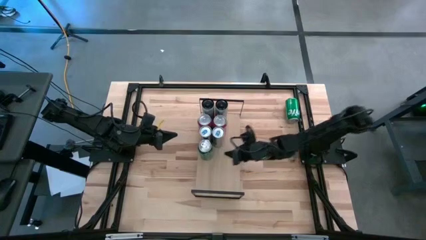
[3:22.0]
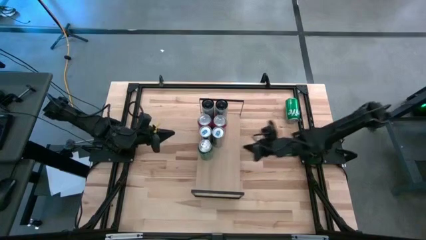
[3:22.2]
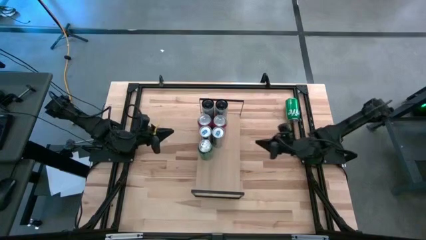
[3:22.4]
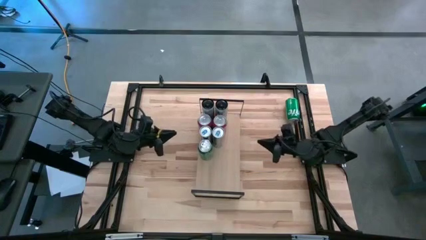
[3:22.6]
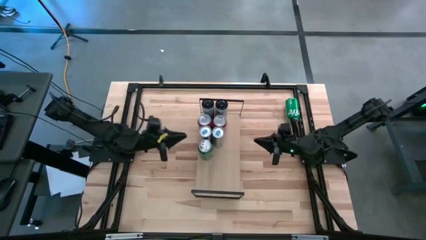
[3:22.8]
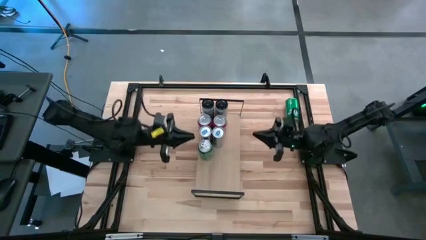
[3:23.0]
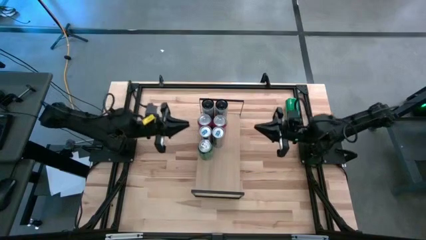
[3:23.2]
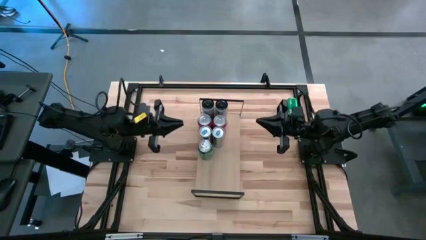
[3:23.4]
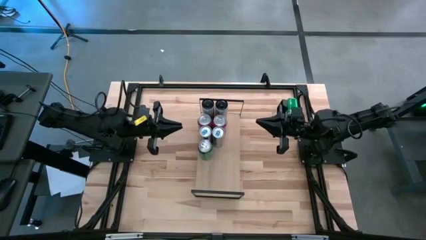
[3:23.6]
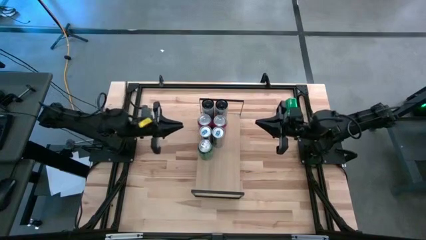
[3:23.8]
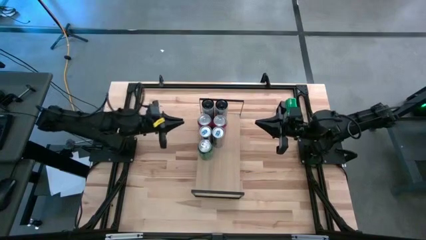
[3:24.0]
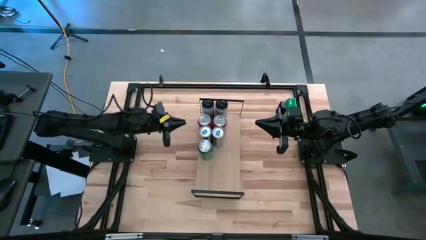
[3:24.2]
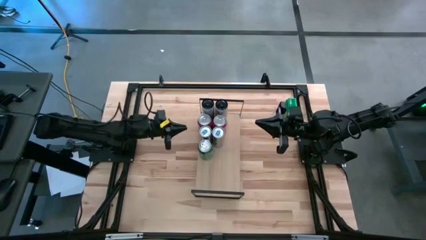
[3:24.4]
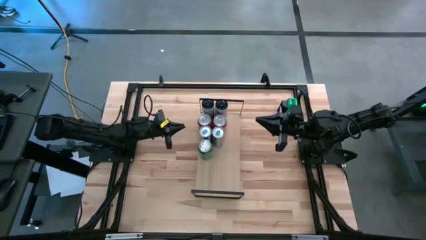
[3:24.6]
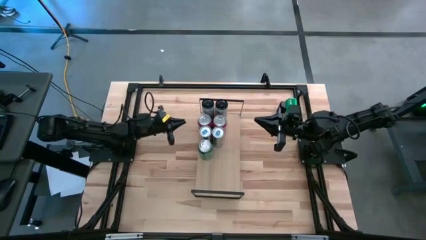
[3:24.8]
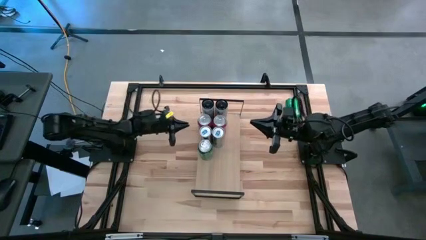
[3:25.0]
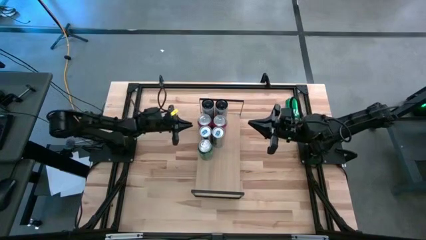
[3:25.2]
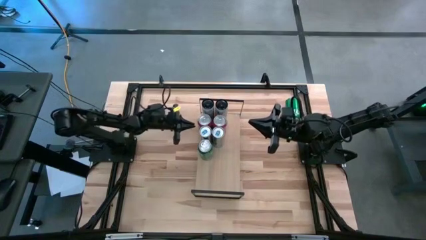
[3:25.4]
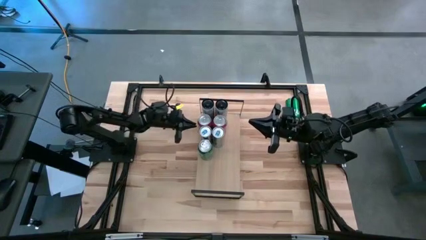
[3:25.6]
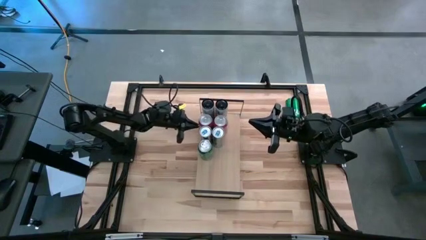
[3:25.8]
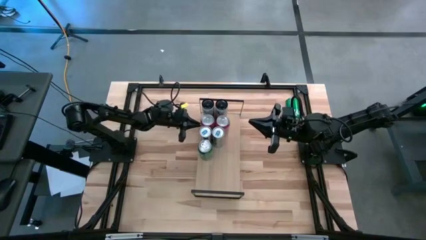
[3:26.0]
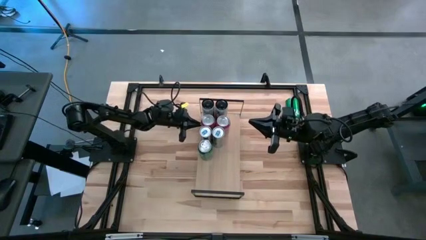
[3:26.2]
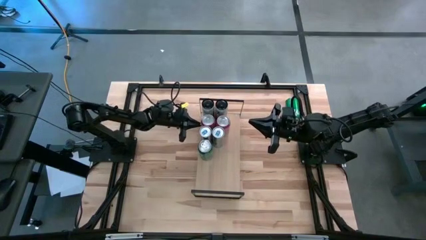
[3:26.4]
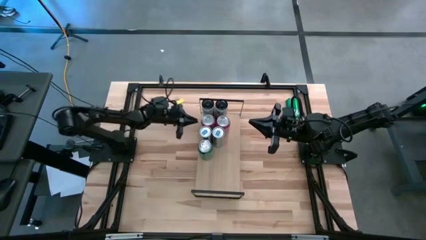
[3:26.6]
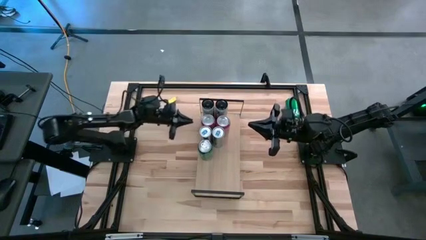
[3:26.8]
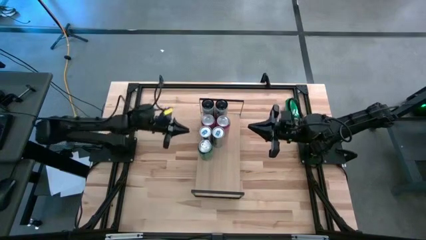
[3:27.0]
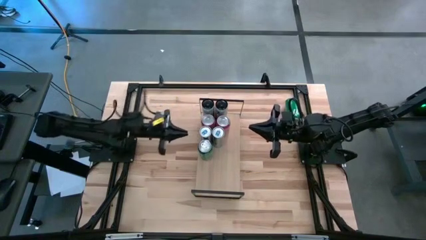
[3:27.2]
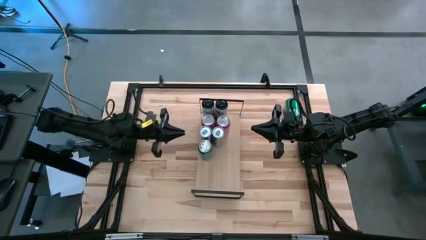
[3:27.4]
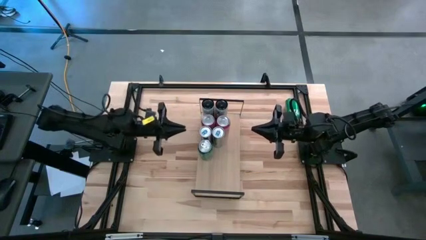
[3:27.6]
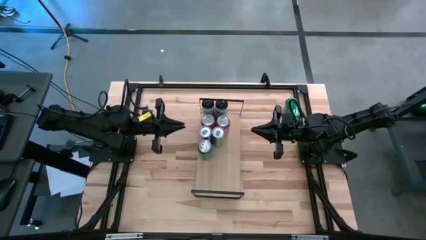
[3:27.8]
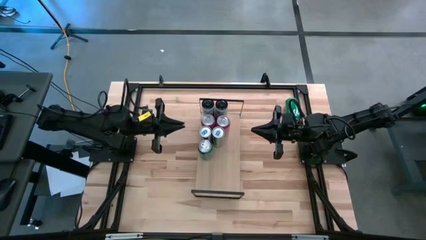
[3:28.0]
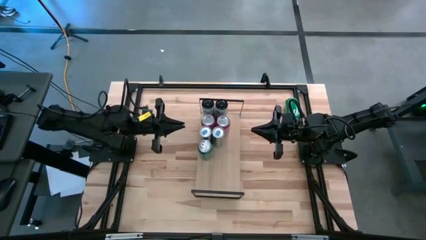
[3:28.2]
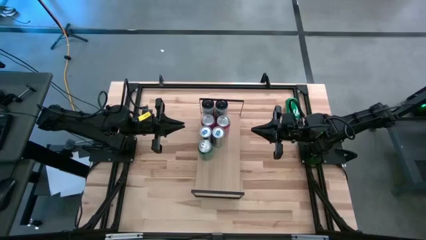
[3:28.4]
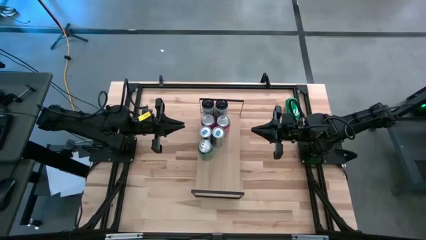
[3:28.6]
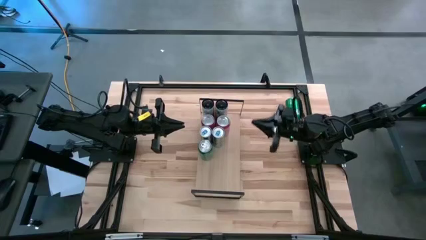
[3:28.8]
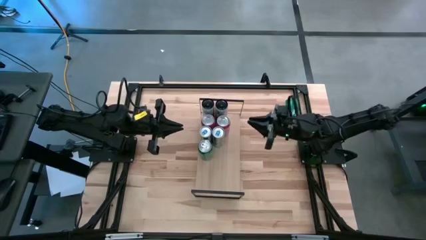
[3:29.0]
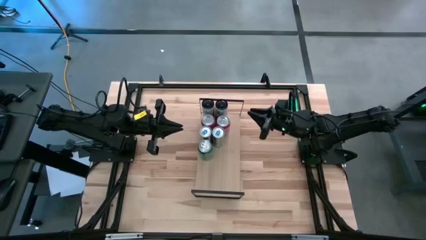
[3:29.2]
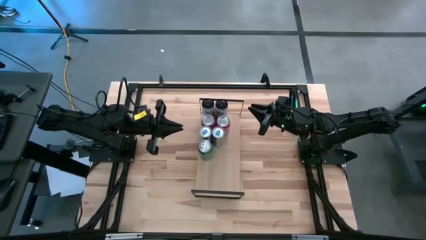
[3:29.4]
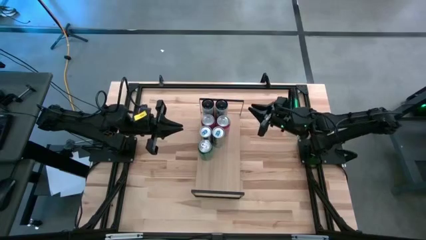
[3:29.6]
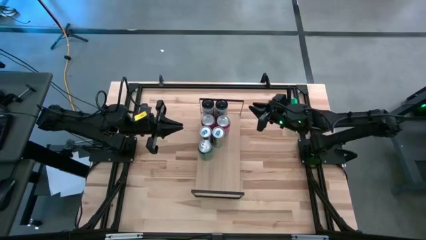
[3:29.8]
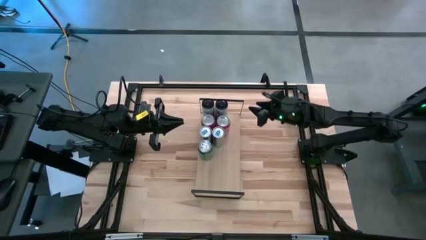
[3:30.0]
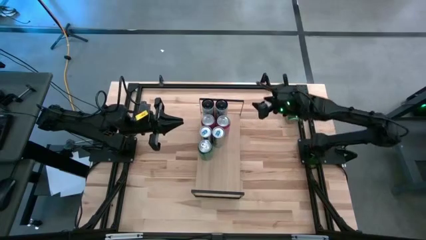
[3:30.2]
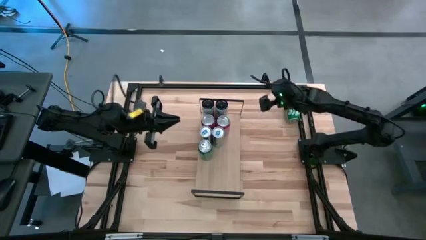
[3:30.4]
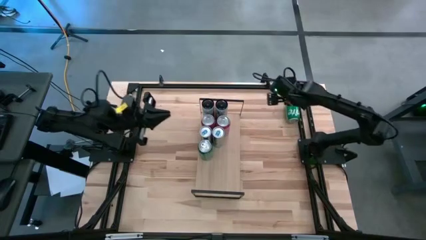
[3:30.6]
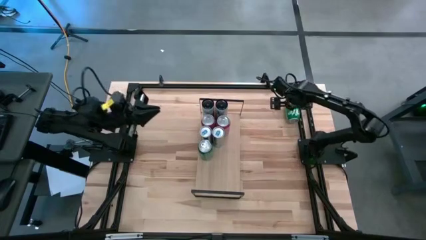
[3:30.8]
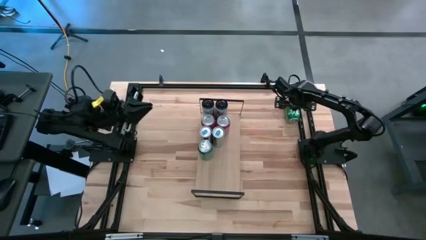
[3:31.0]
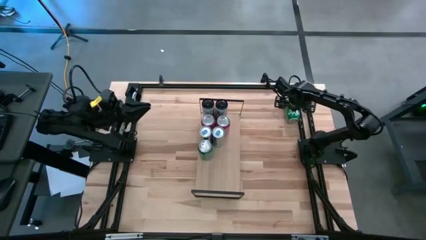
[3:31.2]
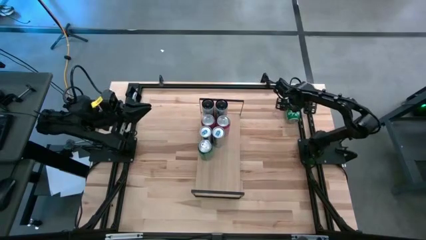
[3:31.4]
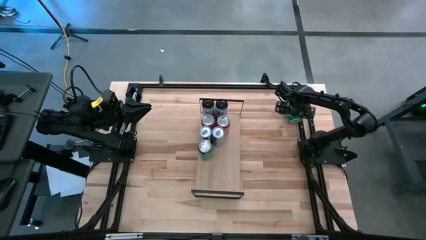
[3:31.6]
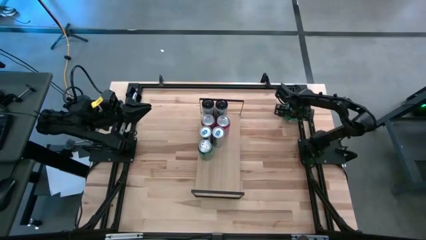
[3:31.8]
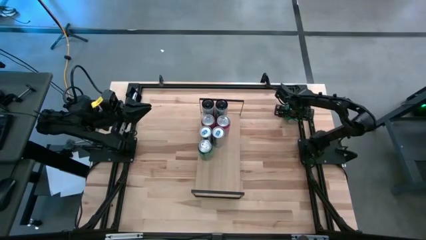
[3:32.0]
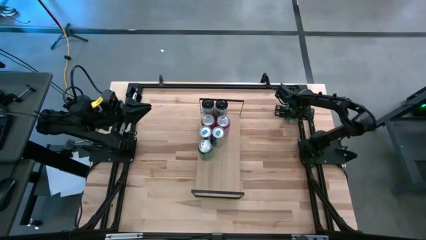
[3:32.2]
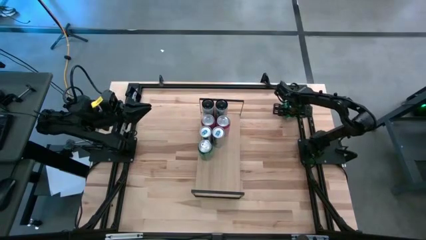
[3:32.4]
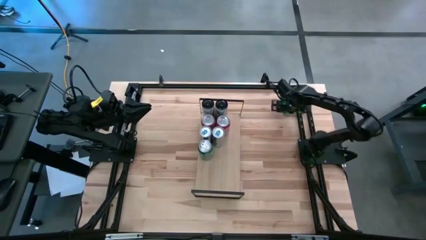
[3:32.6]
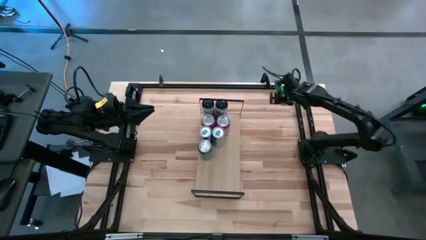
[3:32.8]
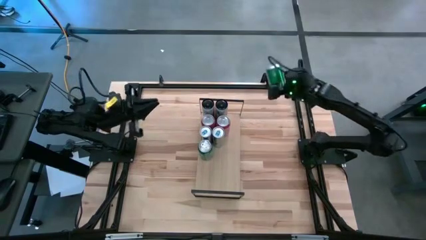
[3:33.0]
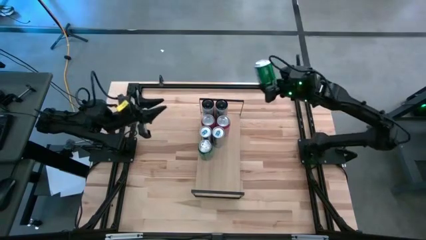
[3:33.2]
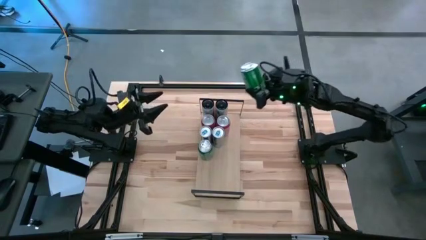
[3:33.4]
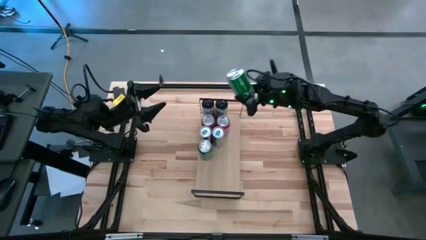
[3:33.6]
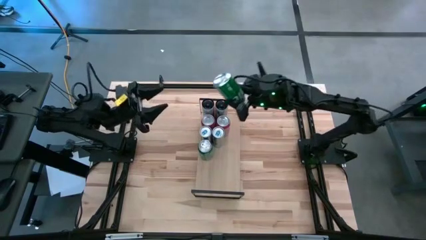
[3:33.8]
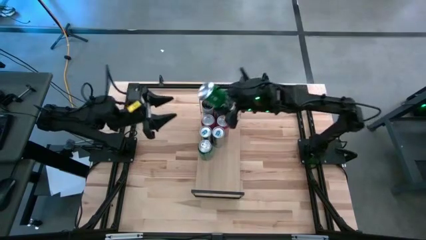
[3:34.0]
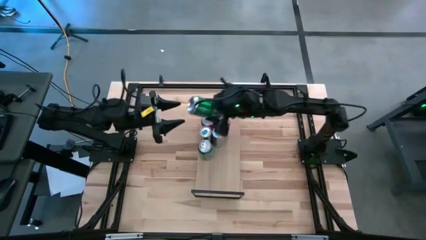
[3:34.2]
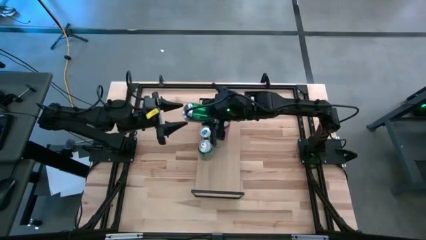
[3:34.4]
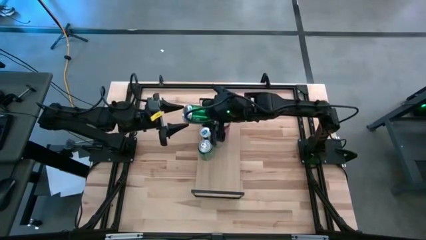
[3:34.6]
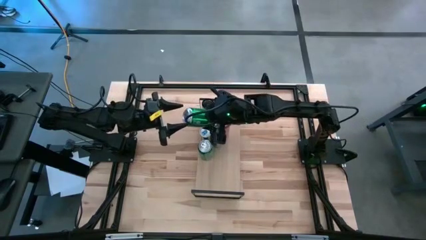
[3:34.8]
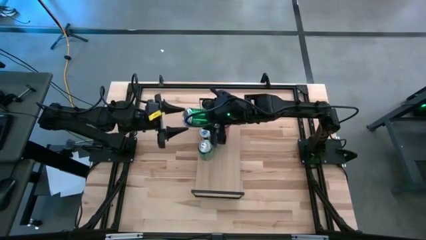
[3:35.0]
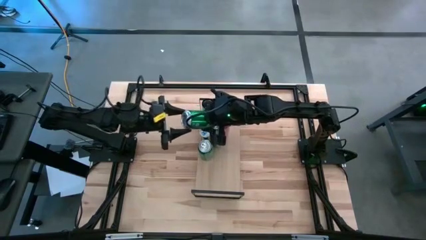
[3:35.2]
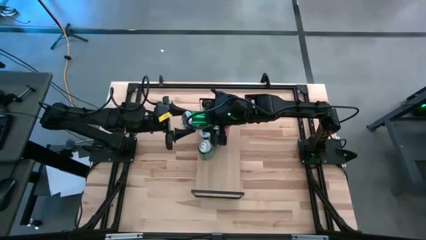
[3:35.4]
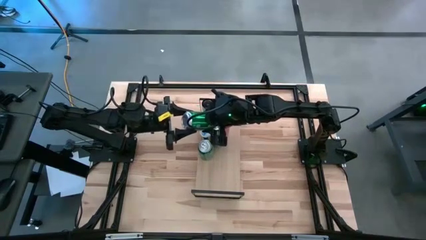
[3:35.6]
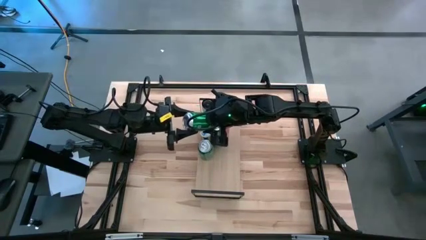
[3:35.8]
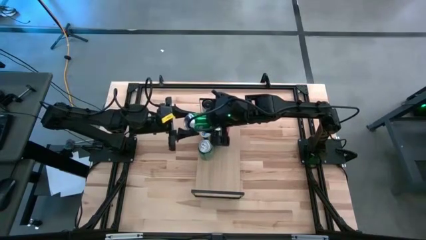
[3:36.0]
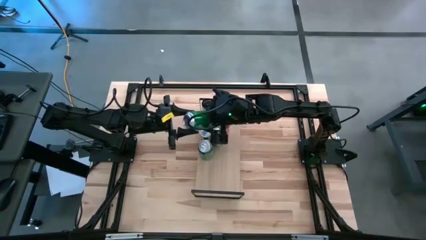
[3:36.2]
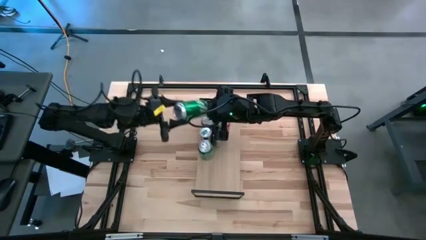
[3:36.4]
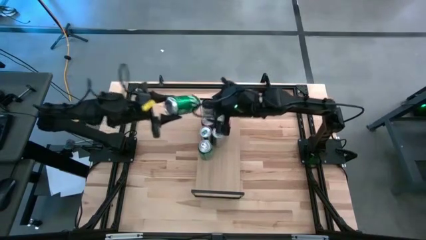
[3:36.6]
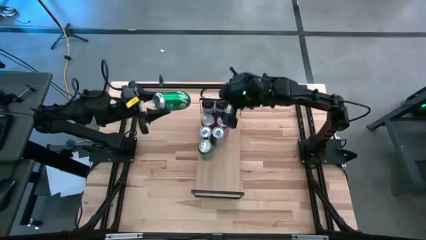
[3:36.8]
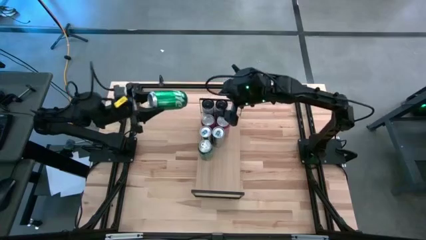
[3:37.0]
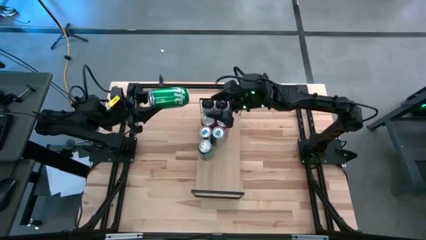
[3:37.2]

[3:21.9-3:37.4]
Task: Place canned beverage on shelf
Put the green soda can, aligned with the other green soda can on the shelf
